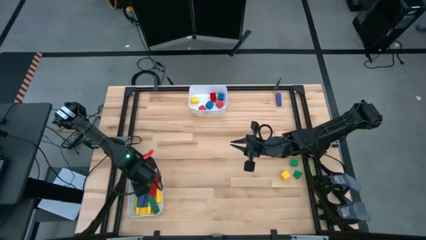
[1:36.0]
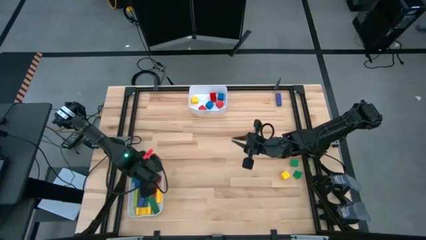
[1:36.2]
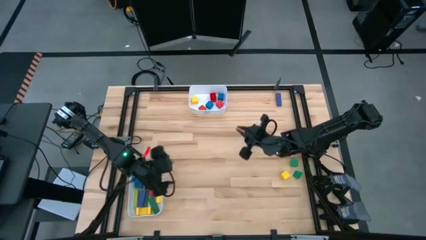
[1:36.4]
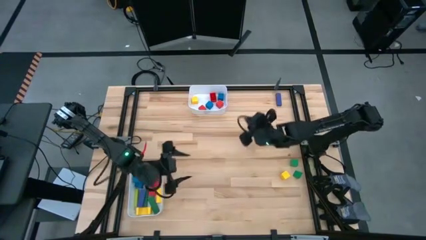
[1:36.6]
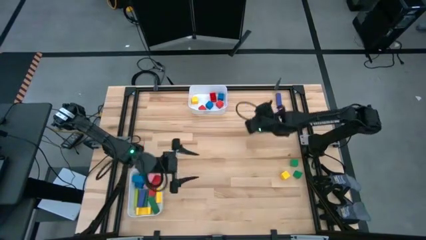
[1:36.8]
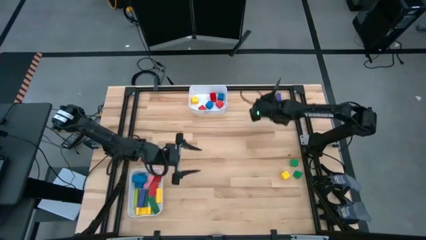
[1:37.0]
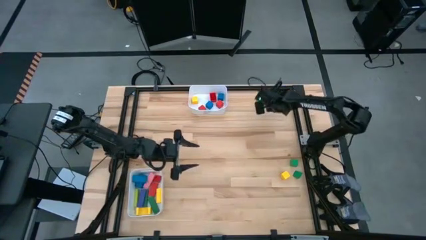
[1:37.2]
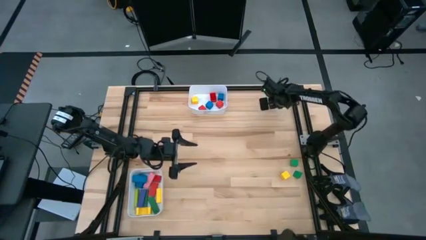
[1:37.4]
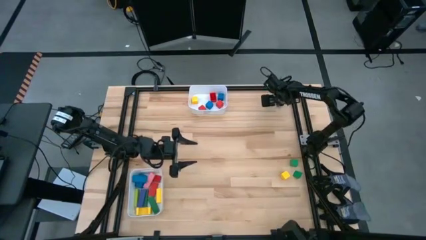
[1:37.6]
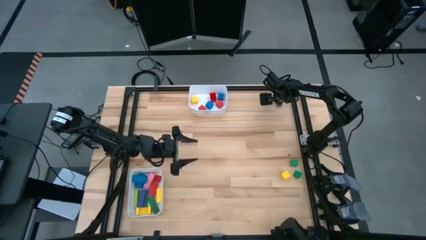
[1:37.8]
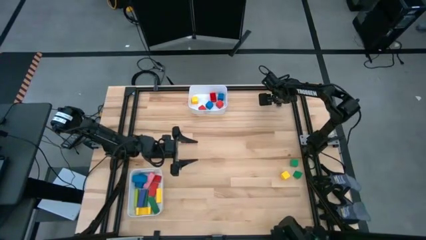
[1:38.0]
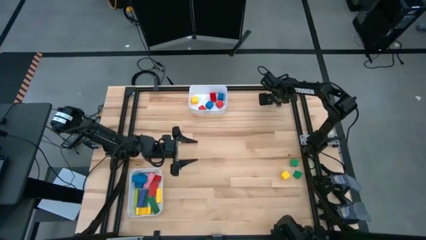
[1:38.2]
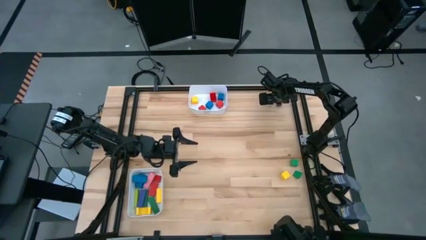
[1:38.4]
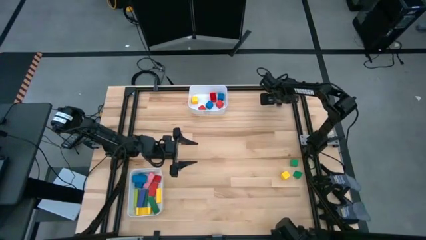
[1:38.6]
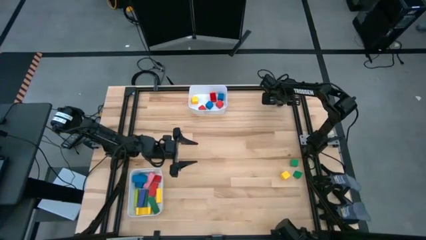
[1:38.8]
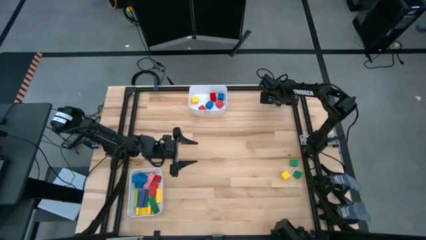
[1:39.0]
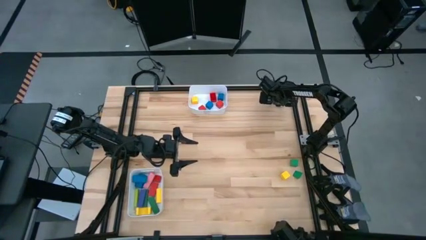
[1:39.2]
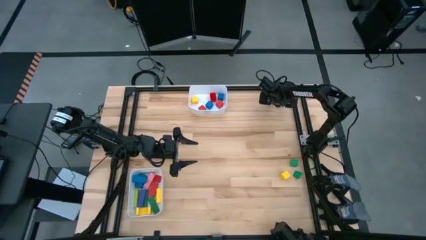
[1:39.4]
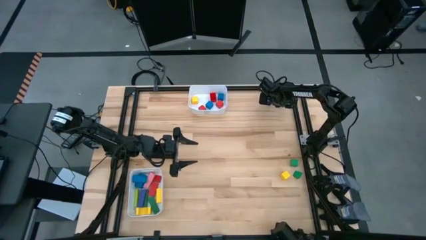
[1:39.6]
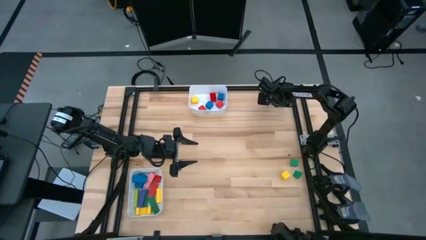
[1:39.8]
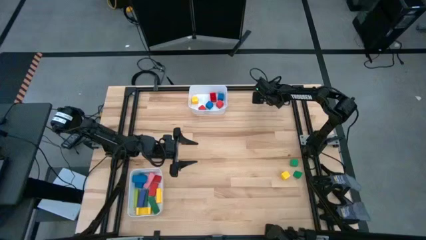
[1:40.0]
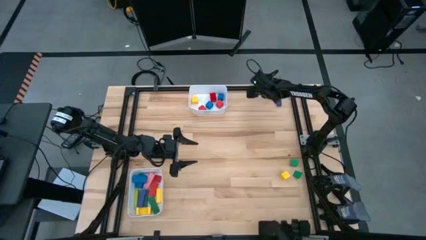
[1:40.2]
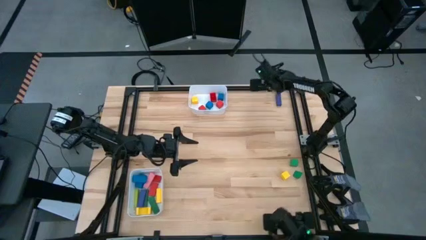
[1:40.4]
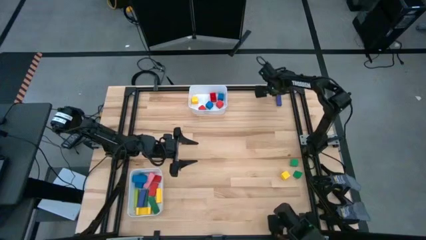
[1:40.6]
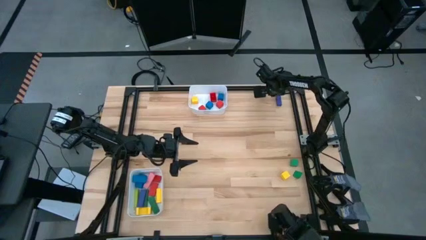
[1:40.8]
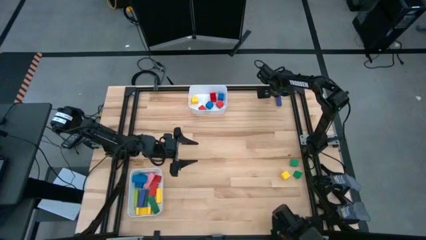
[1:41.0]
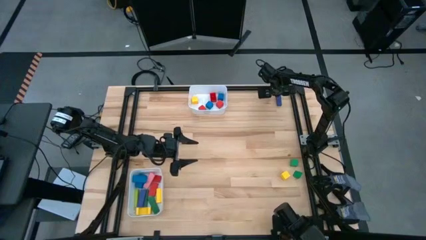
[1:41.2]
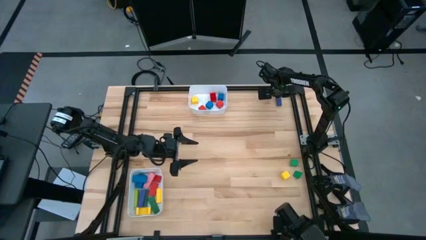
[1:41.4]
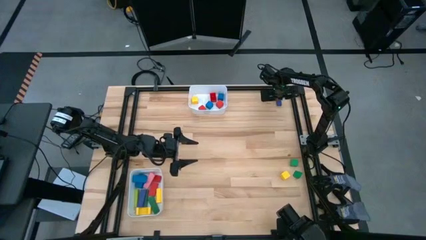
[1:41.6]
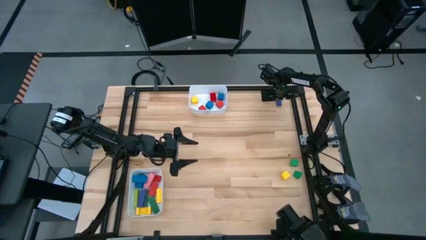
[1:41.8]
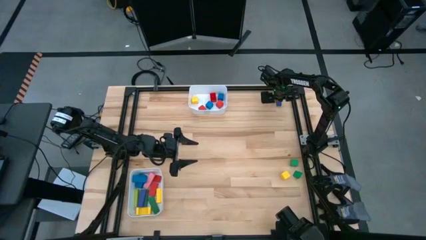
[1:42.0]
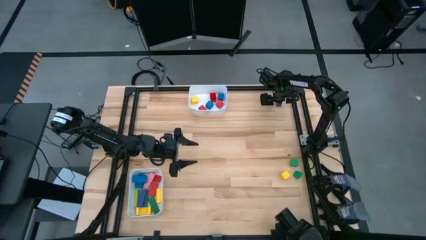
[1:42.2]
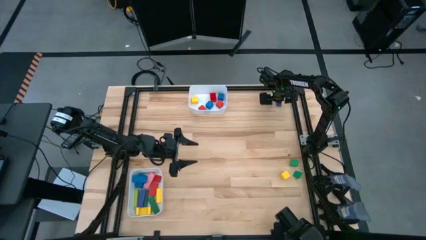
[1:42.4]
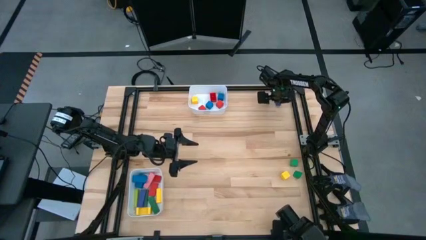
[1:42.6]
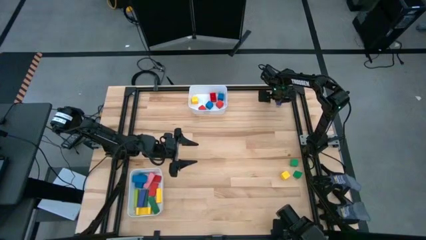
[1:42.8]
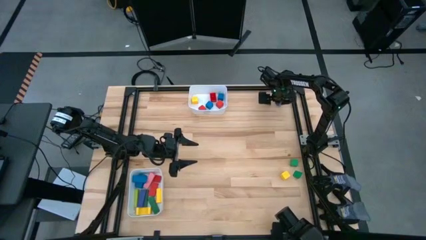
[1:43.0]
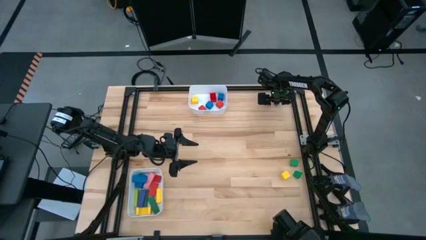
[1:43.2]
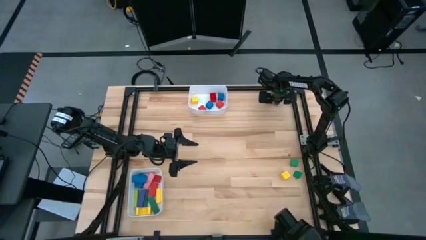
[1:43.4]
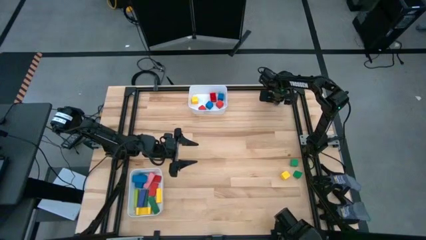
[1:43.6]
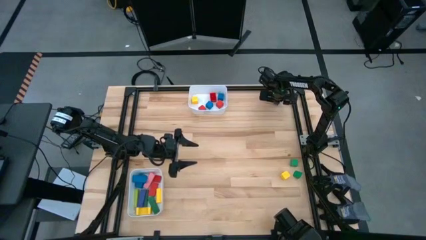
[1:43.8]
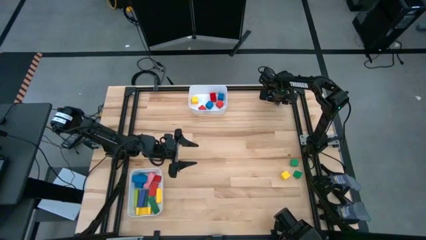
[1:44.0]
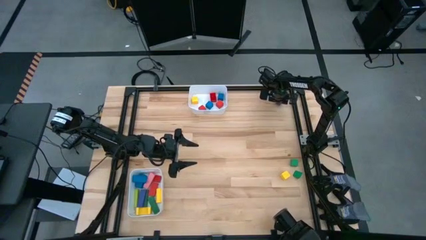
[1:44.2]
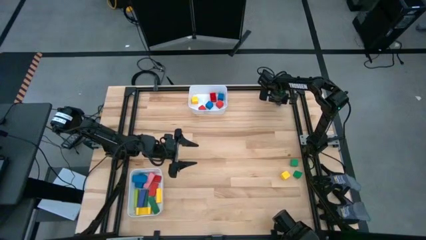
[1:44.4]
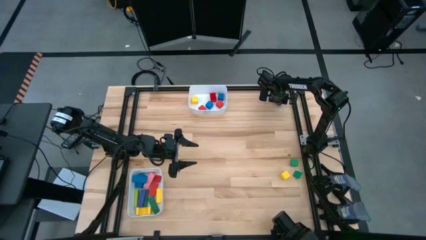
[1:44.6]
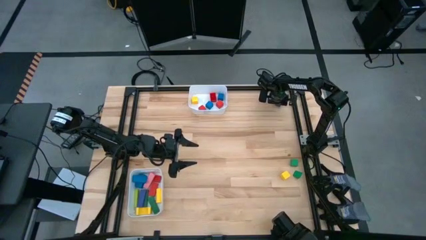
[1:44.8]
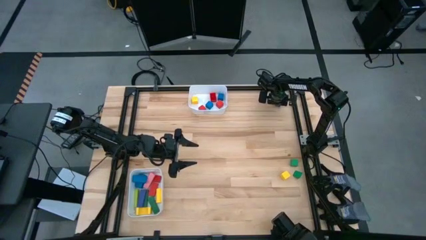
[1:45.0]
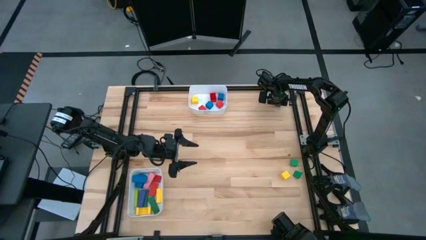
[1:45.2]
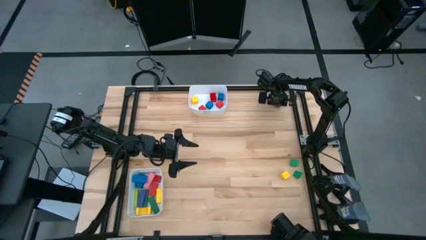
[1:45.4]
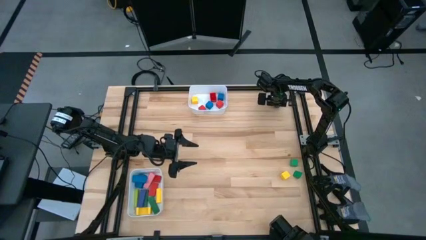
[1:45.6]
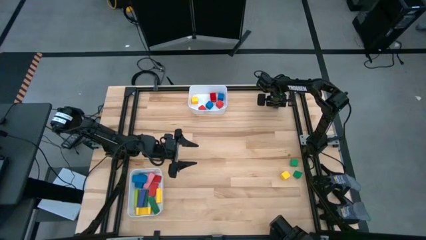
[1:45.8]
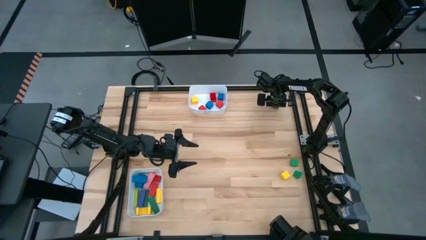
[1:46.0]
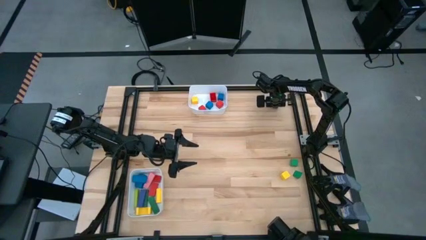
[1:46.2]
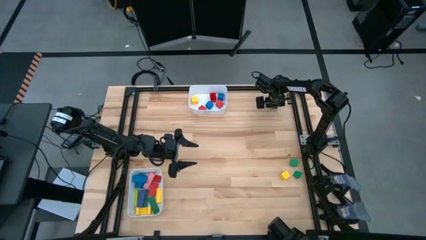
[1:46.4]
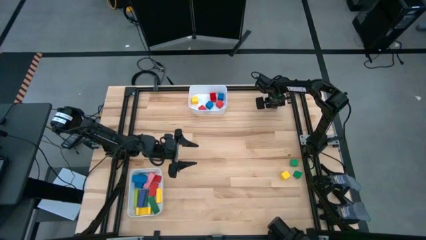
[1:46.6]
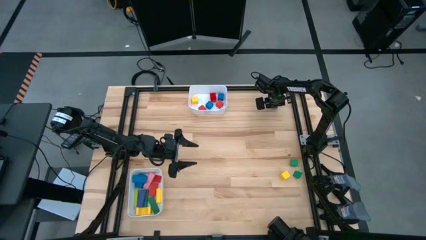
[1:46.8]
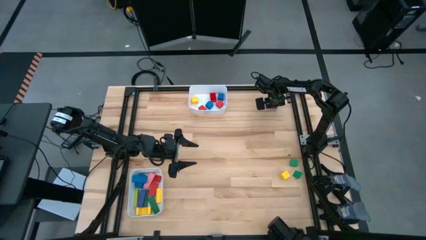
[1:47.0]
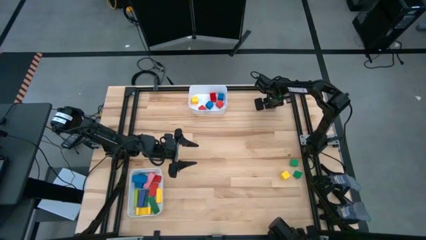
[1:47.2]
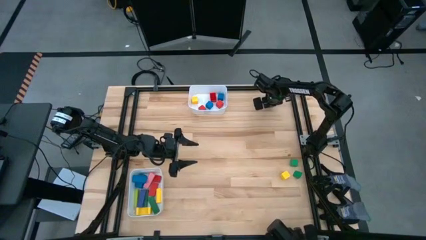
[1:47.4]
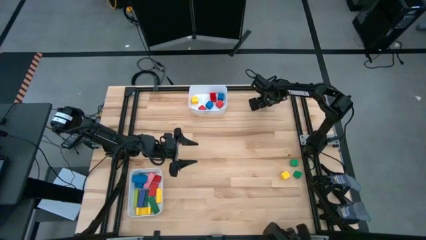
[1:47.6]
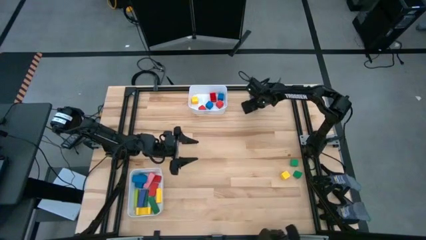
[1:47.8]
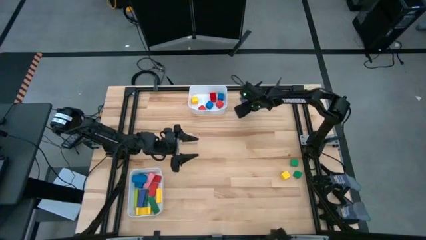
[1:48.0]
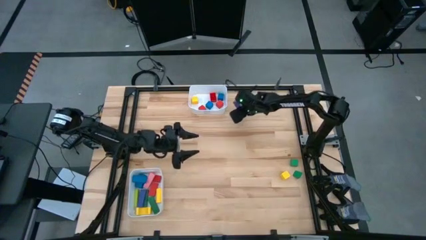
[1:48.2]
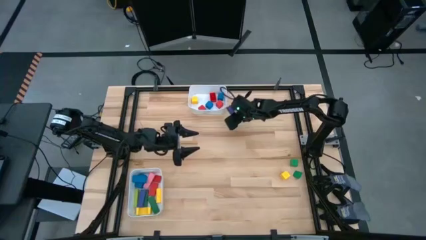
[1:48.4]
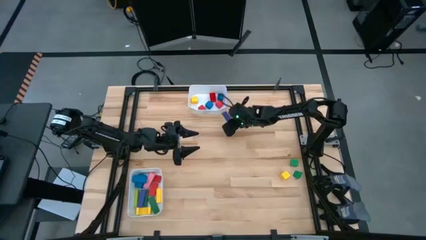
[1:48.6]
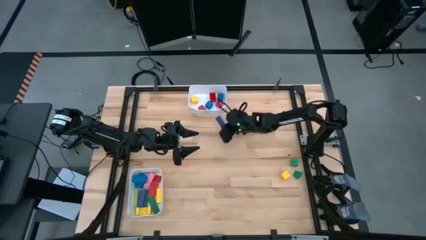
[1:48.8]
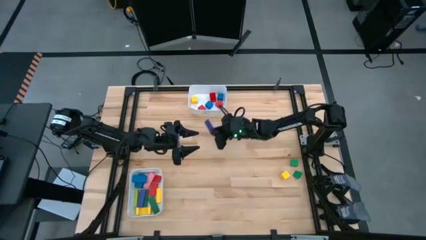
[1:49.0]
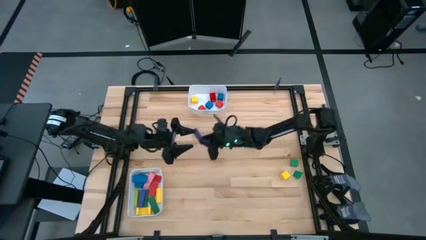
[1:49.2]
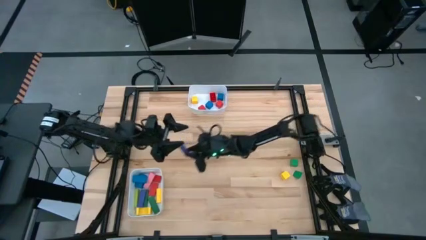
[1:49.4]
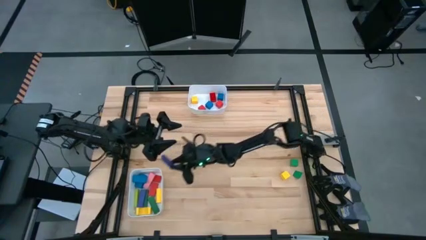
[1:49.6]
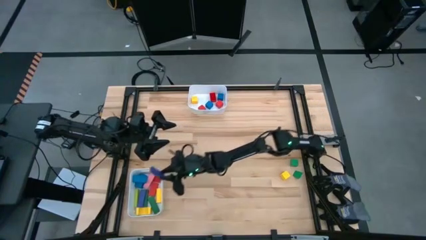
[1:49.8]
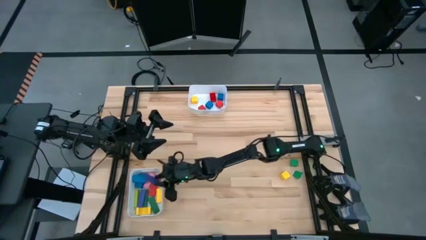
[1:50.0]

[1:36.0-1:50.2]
Task: Sort blocks by size
Put the violet rectangular block into the bottom white bin

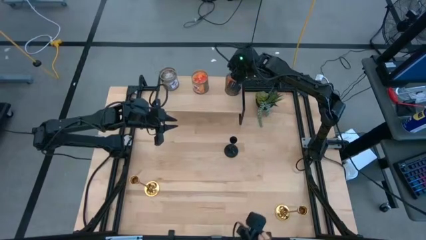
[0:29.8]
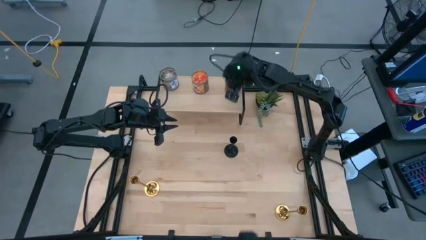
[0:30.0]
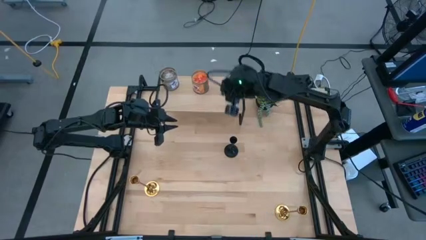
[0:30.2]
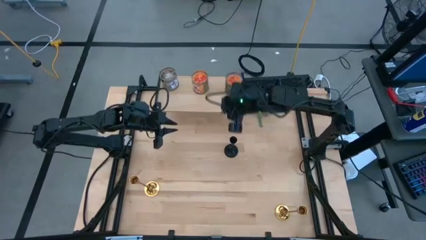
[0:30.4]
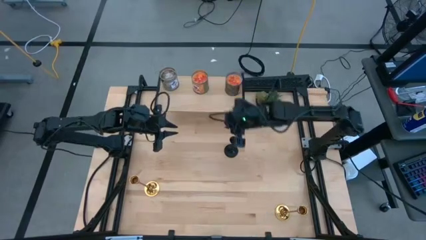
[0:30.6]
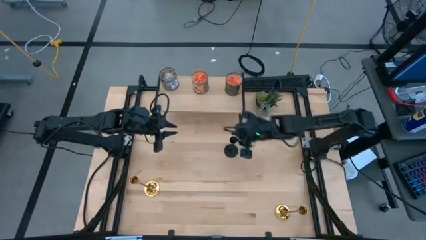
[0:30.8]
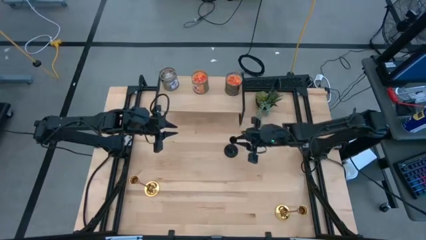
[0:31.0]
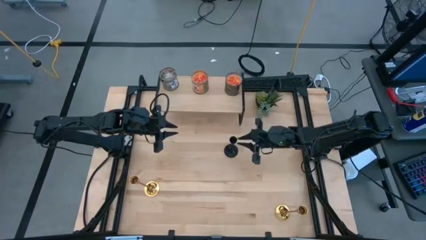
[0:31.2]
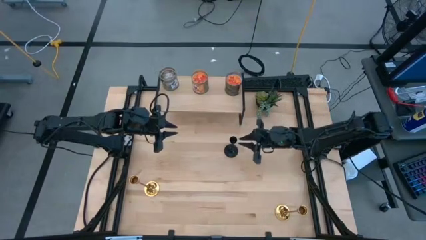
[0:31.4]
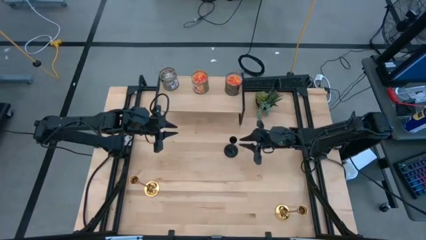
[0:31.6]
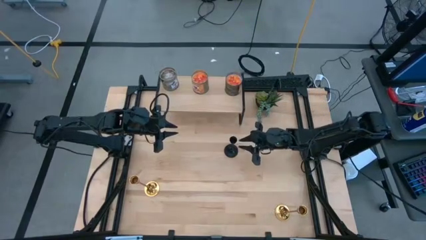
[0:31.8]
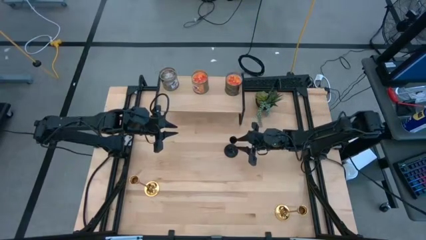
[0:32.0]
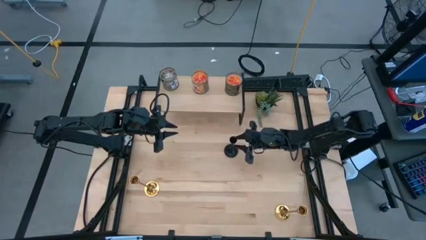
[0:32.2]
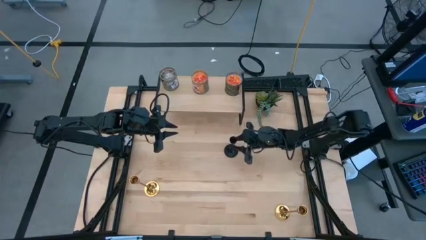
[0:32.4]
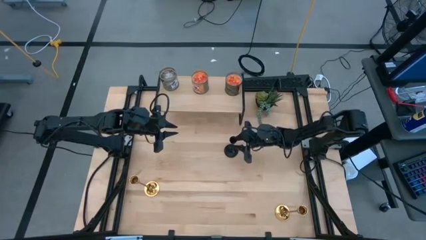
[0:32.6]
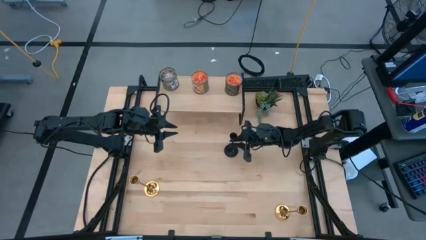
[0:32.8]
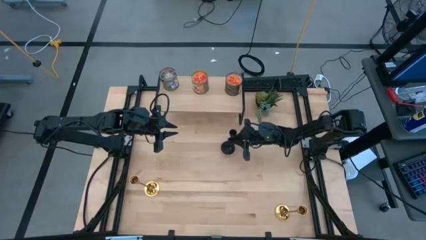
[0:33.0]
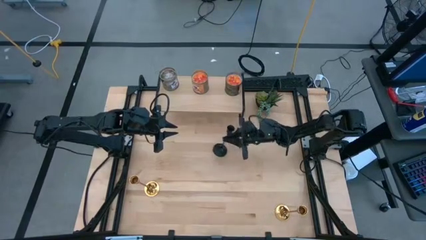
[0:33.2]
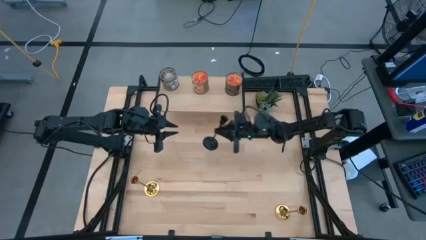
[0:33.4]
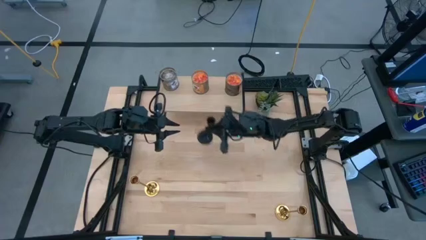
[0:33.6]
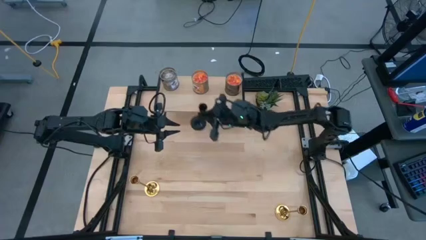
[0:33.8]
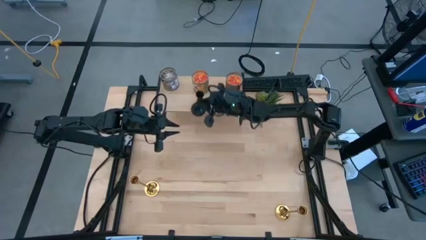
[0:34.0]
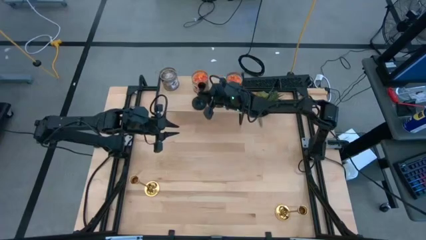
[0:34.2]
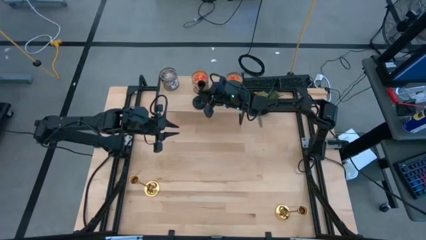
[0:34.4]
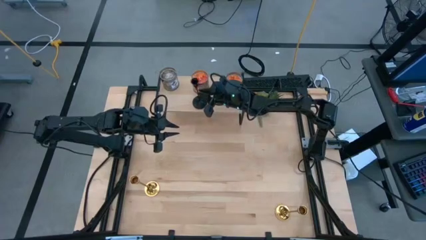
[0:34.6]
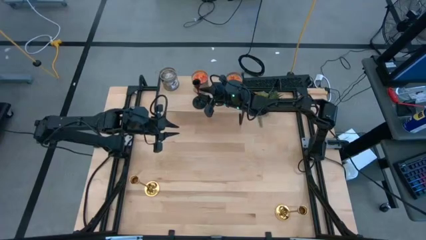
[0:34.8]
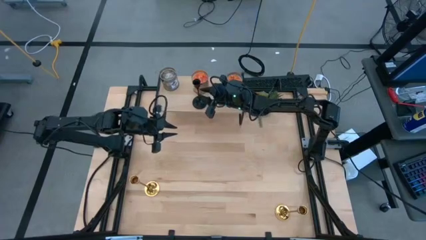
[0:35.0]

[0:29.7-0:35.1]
Task: Pick & Place candle stick holders
Put the black candle holder on the shelf
